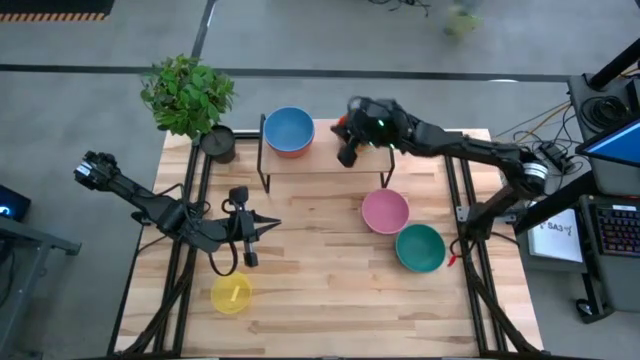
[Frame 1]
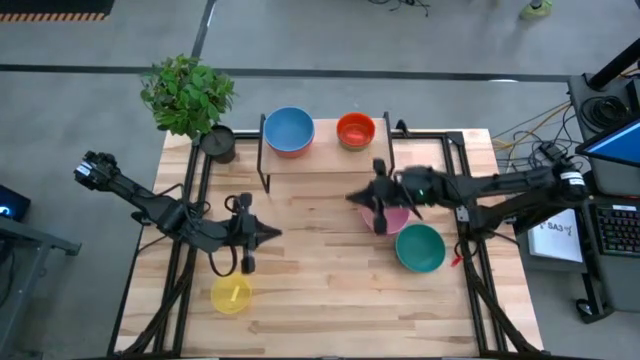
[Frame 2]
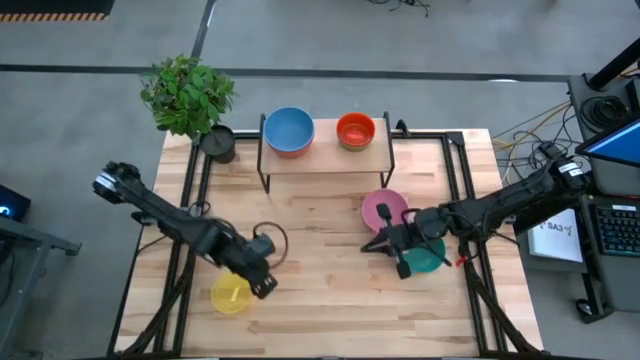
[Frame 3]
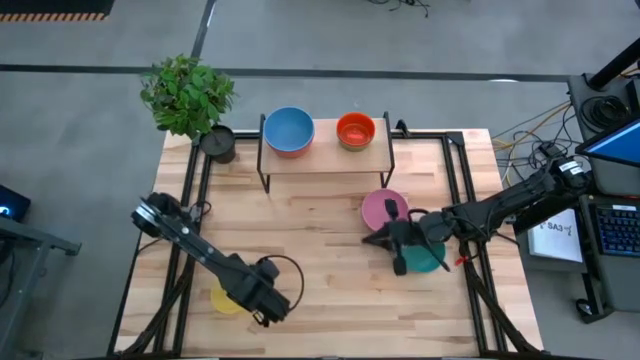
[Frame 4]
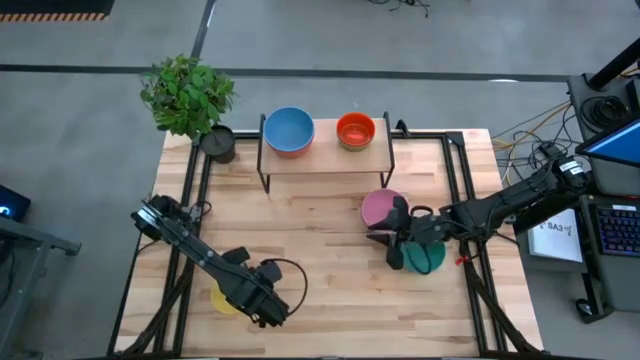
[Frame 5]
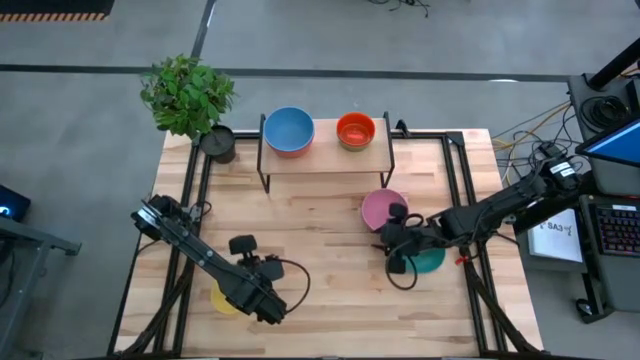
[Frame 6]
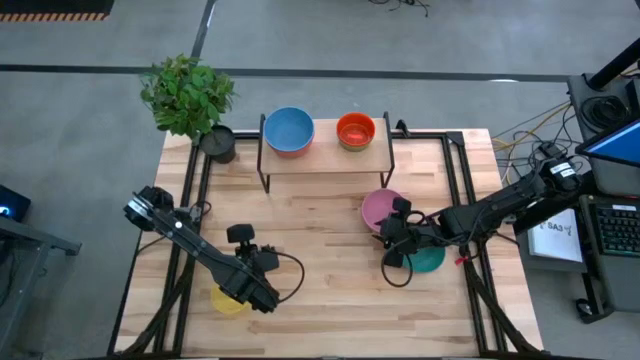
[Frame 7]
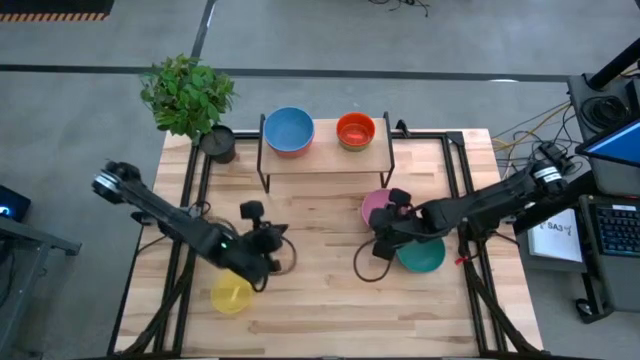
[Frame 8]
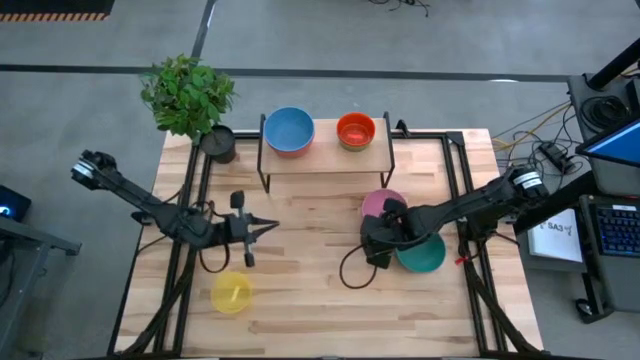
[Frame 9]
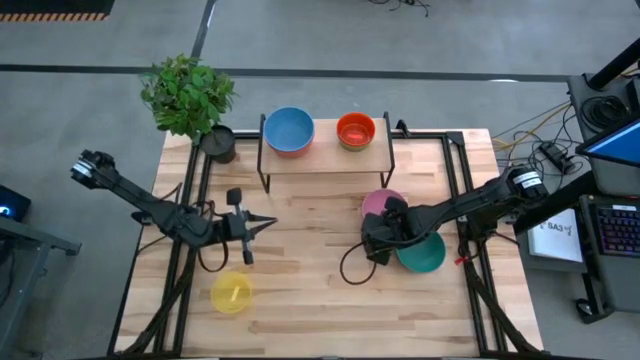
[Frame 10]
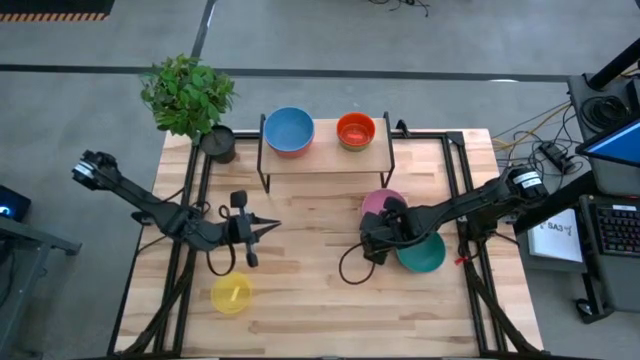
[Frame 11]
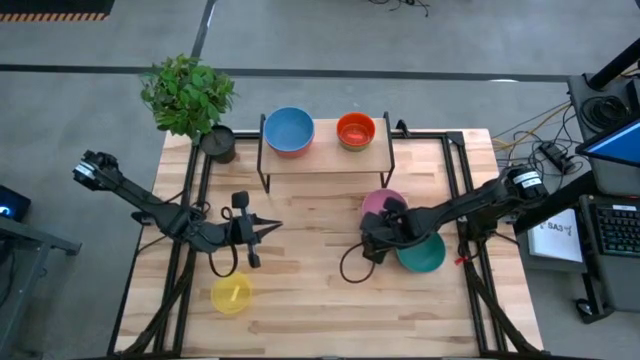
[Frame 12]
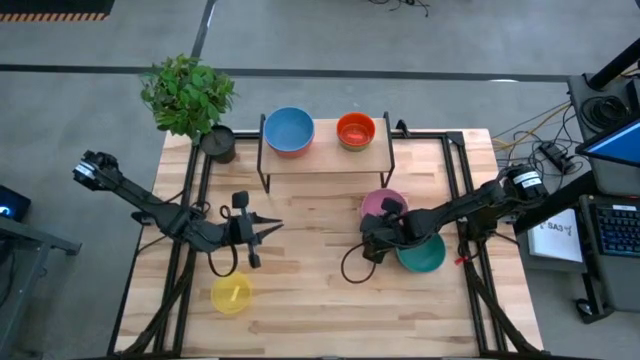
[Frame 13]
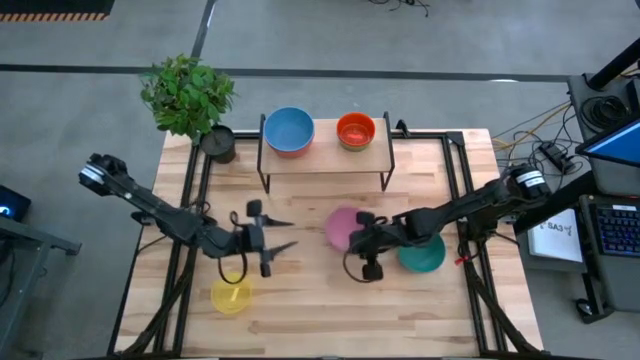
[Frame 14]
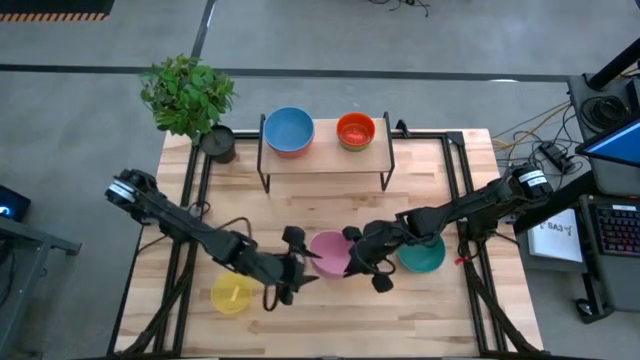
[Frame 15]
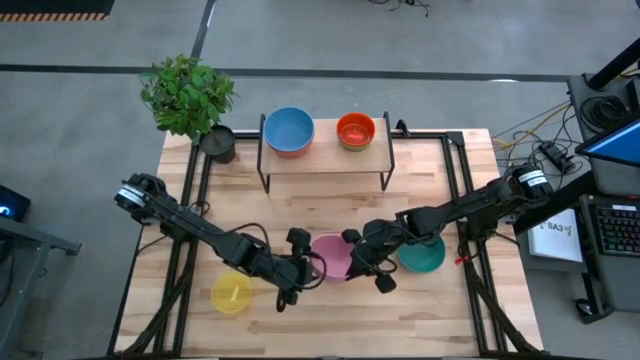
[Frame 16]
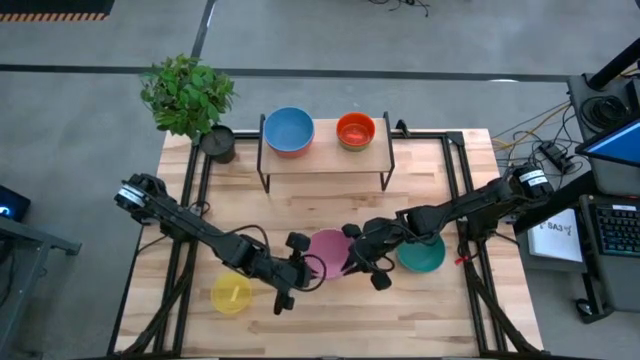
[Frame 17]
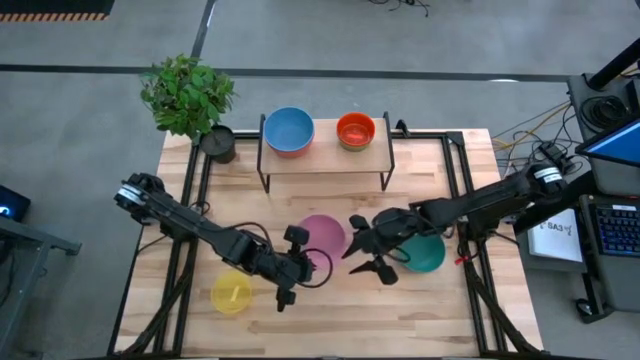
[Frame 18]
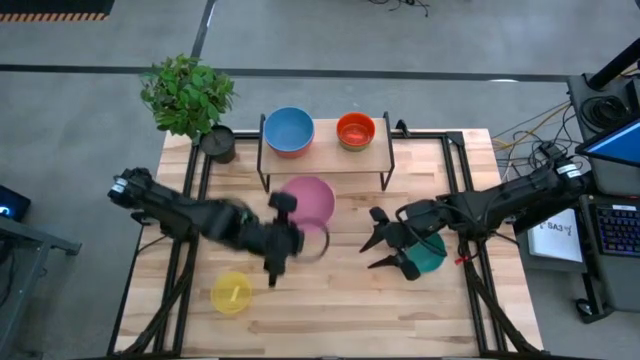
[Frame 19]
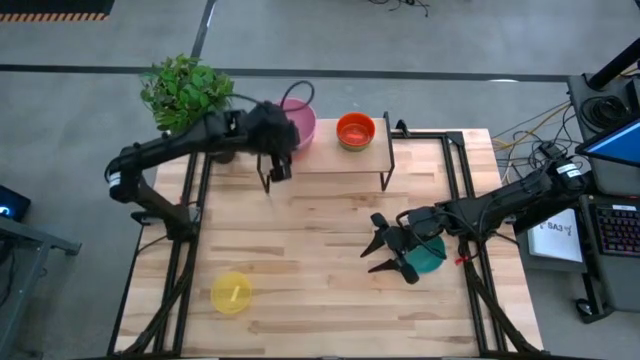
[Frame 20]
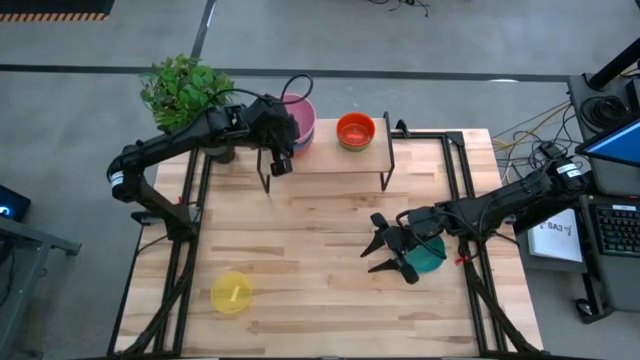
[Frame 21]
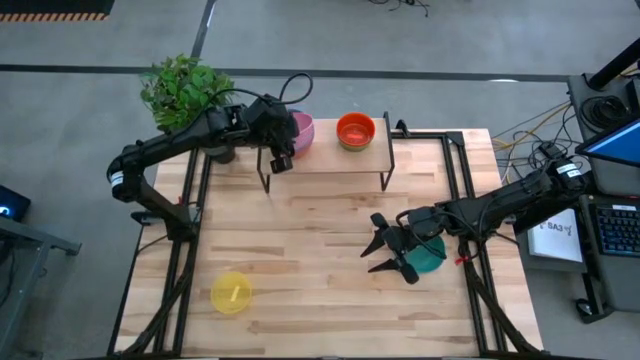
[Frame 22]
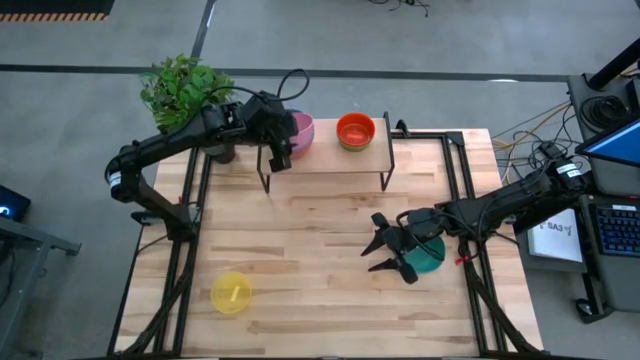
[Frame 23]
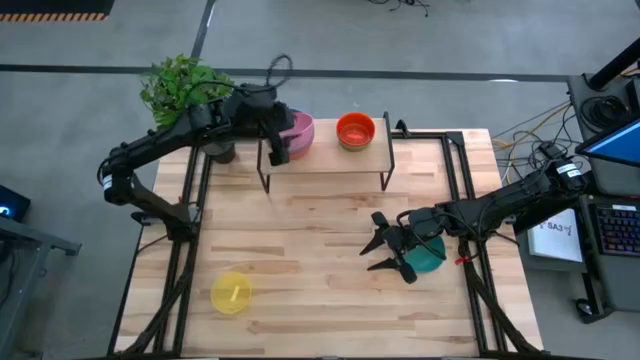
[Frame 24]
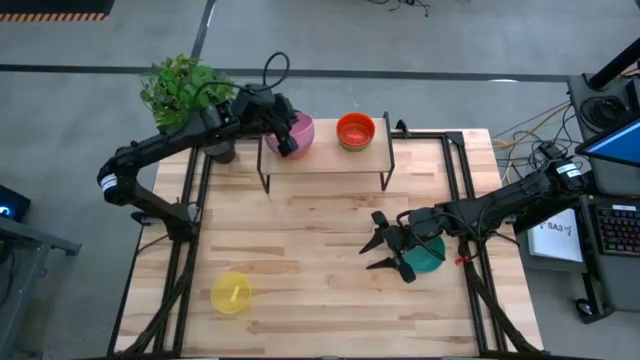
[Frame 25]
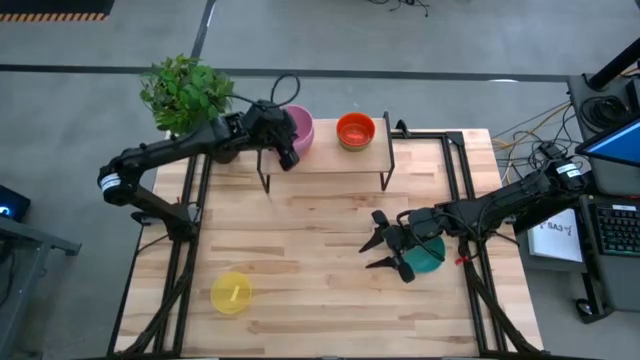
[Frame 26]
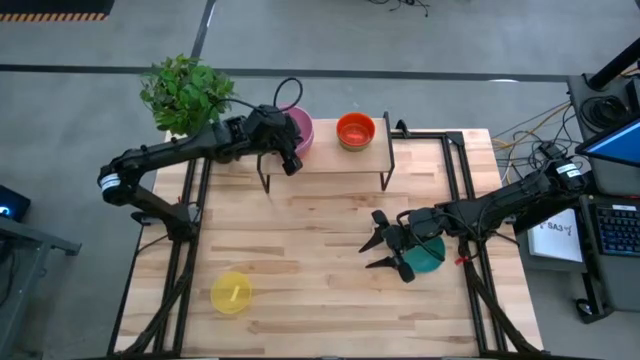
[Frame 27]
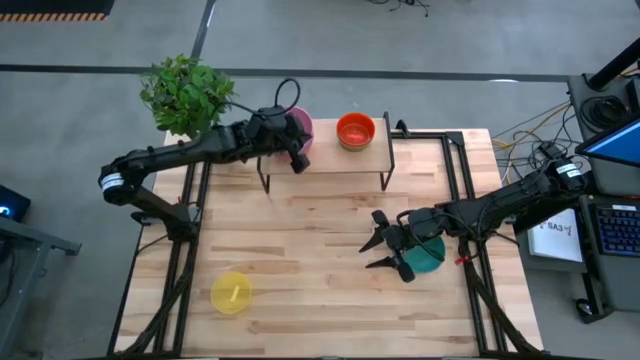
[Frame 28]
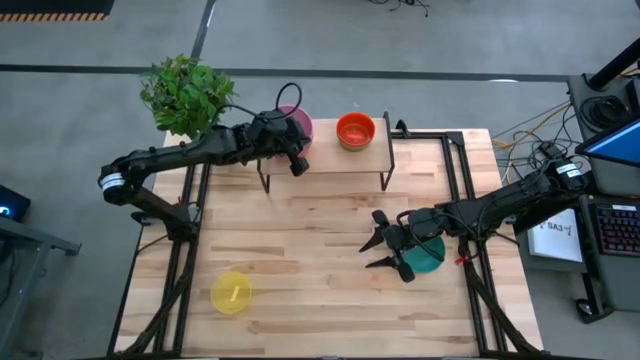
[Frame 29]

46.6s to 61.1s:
Task: Place and stack bowls onto a shelf
Stack the large pink bowl on top of the large blue bowl on the shelf

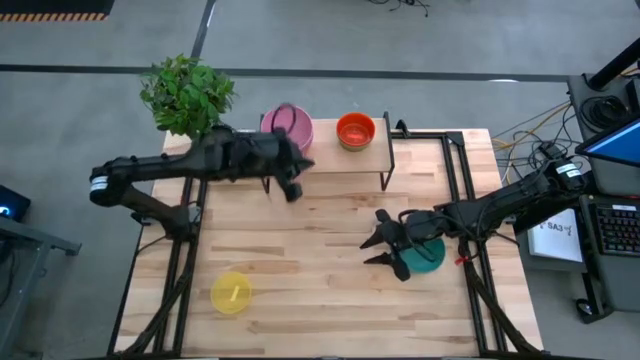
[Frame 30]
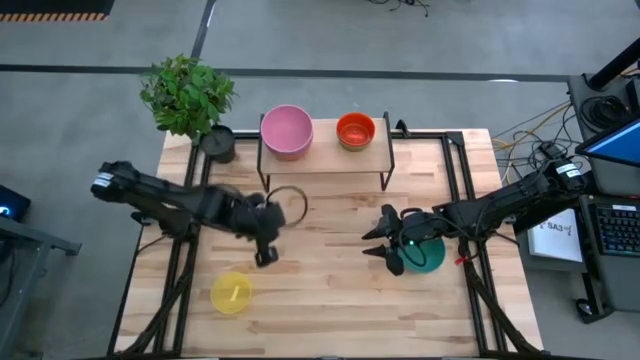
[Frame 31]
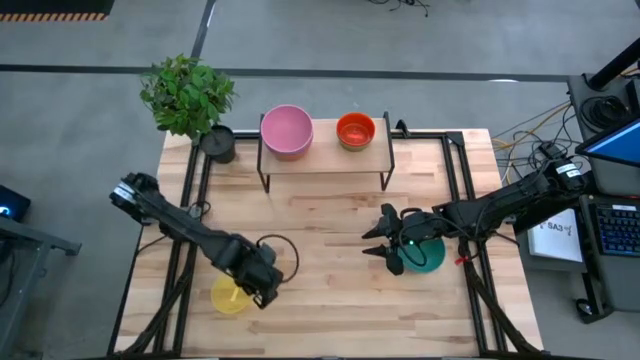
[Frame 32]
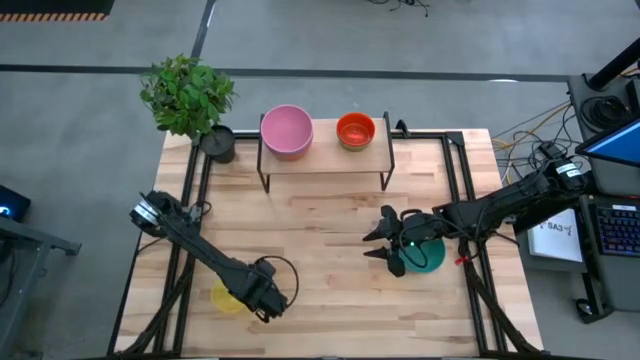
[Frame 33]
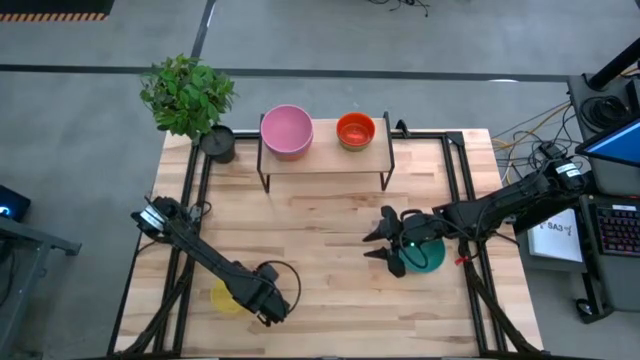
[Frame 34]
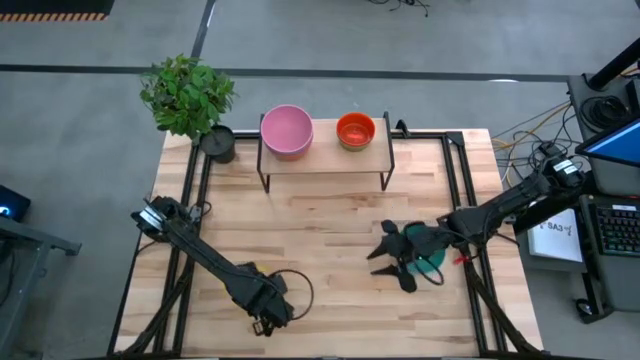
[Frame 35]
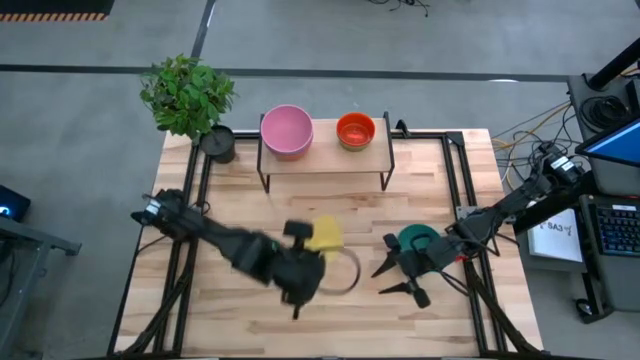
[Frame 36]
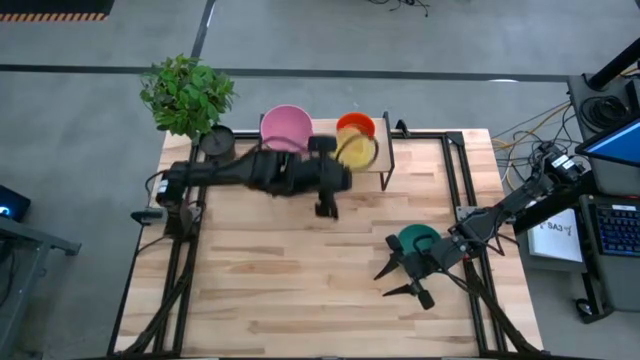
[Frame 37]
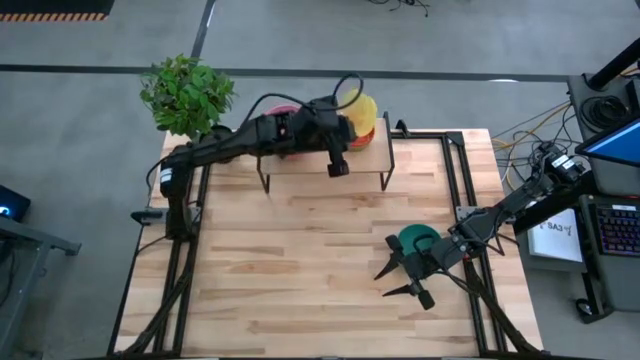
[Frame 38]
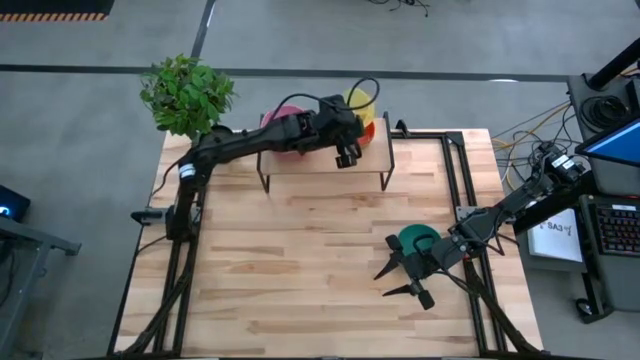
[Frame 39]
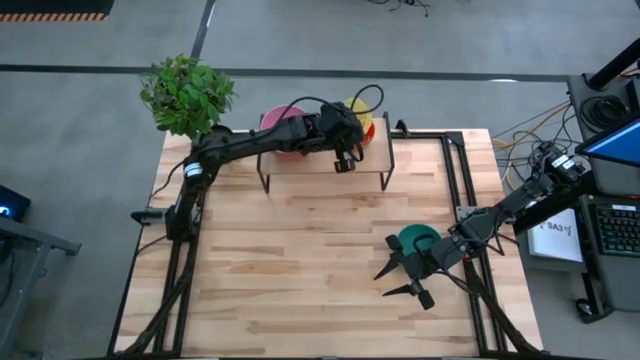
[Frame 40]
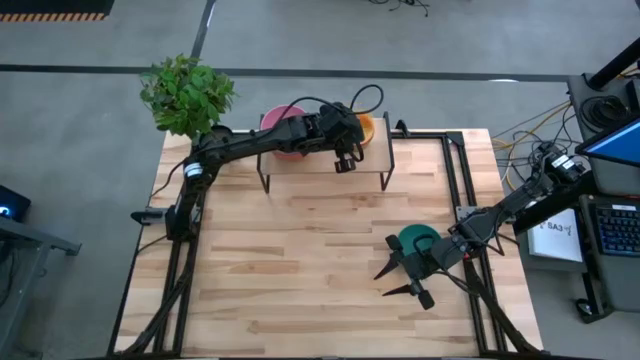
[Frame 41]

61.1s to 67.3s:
Stack the small yellow bowl on top of the small orange bowl on the shelf

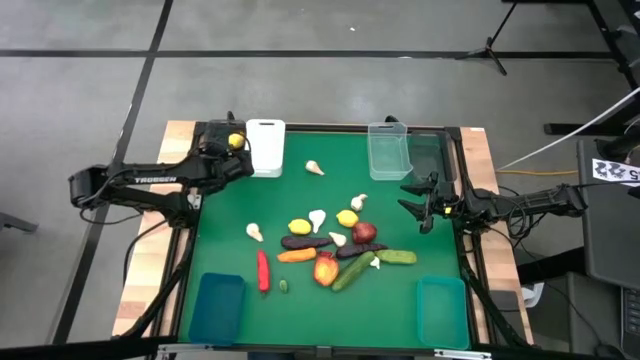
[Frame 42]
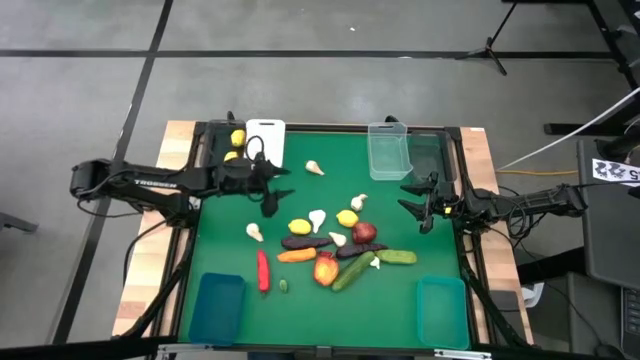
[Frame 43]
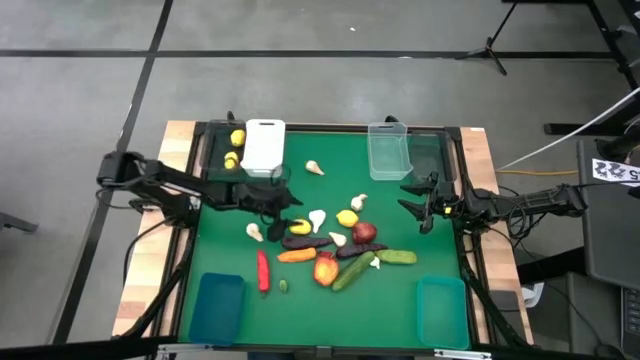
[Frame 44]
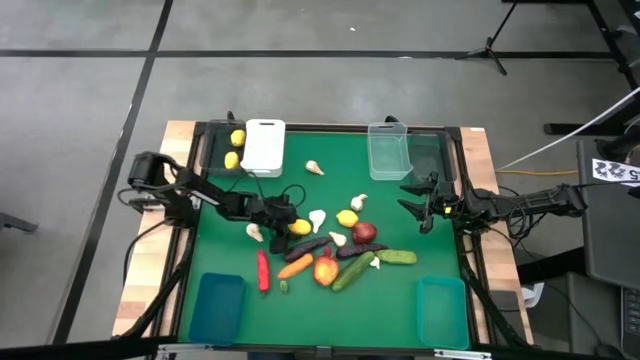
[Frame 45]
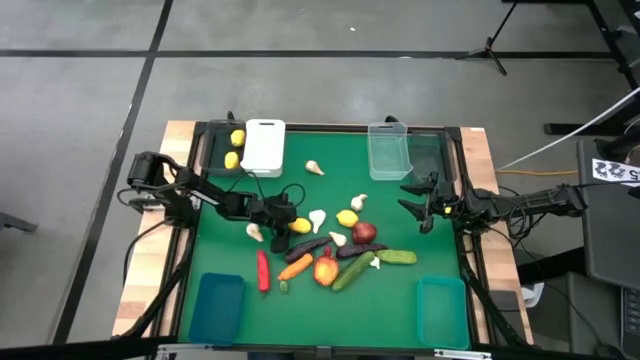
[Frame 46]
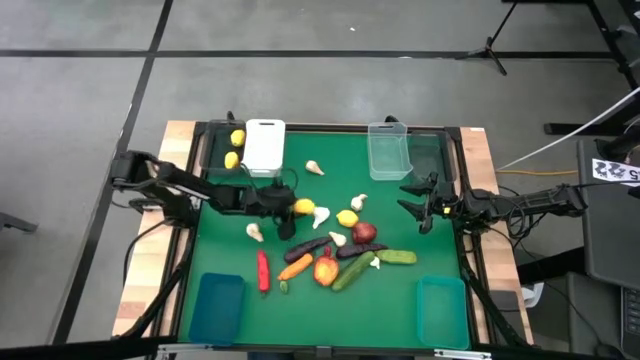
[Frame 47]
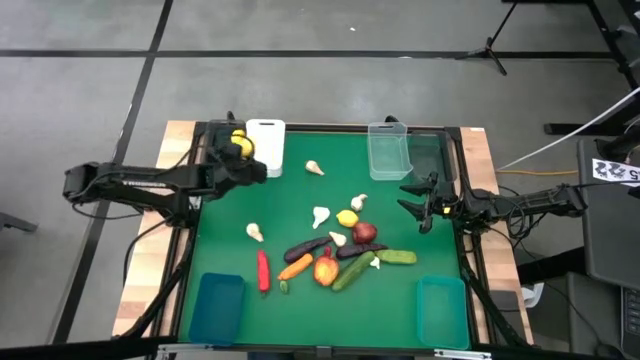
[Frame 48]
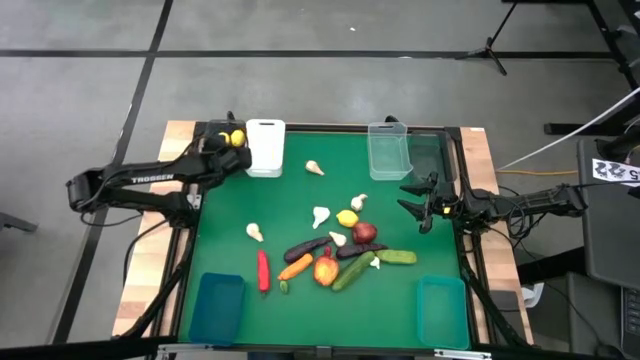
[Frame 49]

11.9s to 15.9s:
Task: Sort produce into baskets
Put the lemon into the left black bin
